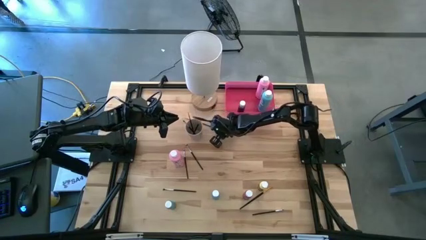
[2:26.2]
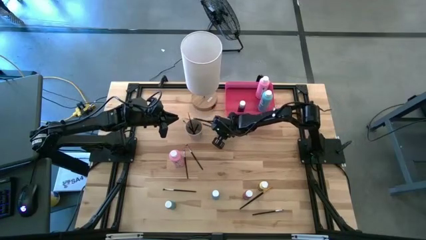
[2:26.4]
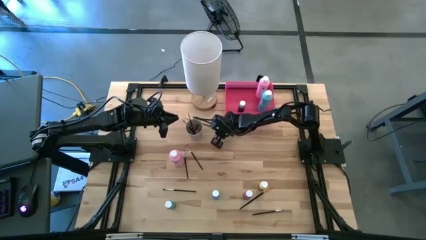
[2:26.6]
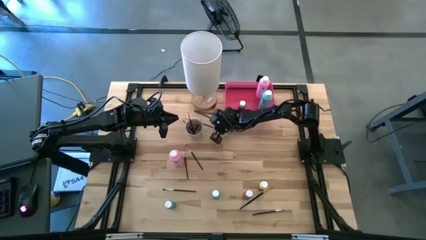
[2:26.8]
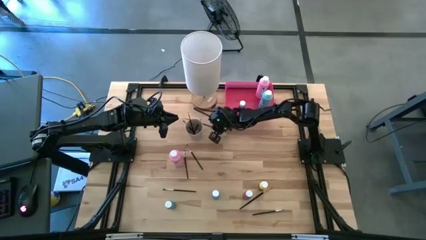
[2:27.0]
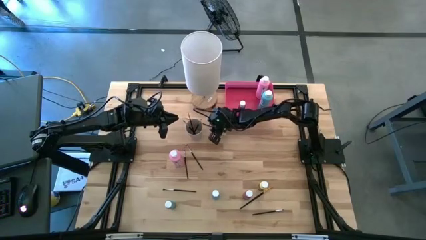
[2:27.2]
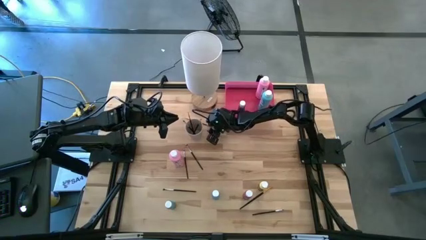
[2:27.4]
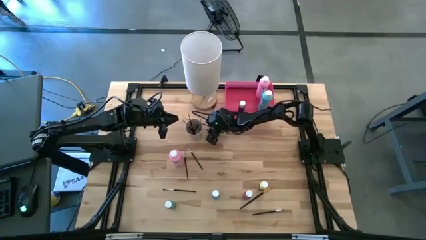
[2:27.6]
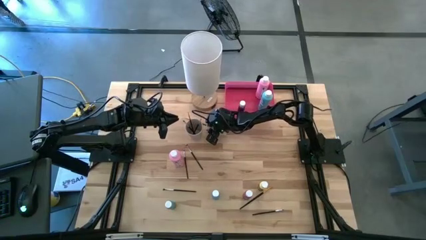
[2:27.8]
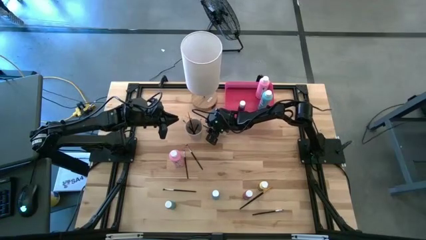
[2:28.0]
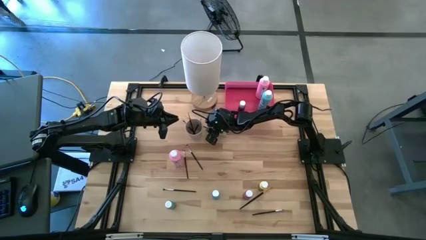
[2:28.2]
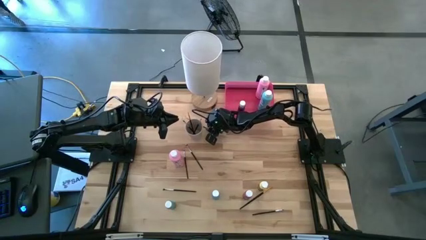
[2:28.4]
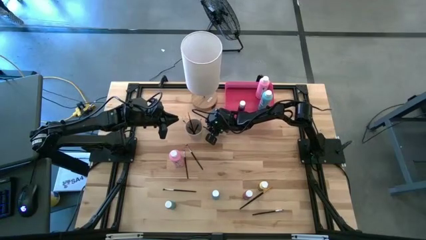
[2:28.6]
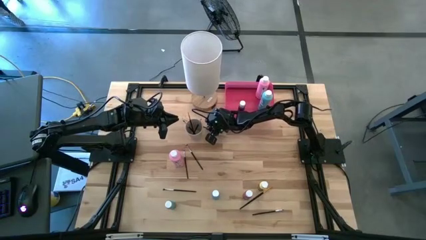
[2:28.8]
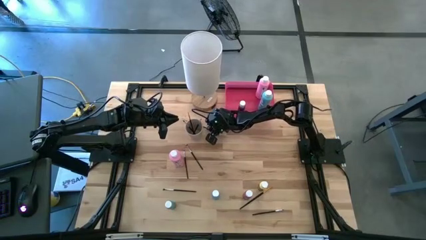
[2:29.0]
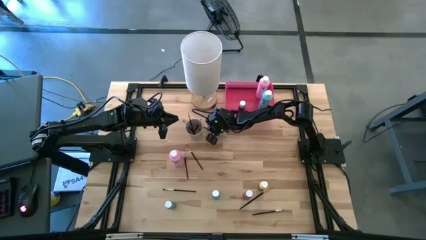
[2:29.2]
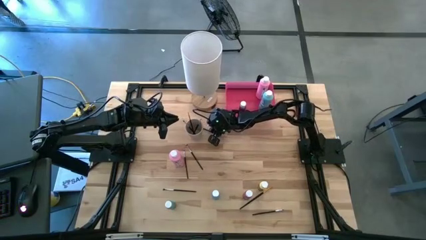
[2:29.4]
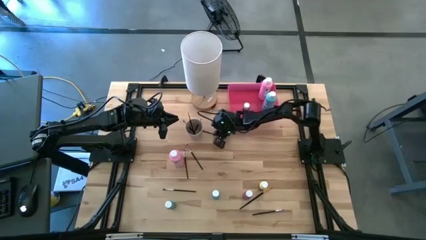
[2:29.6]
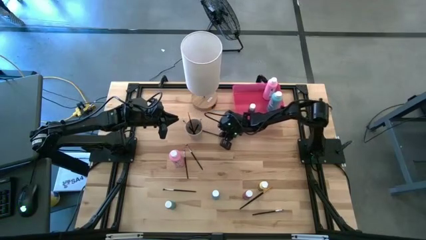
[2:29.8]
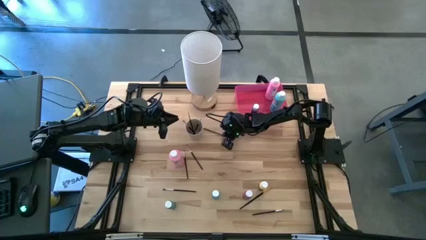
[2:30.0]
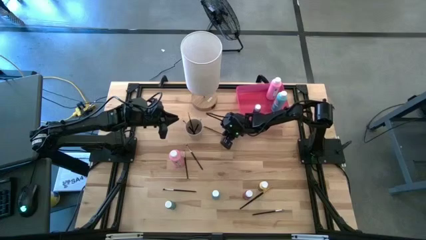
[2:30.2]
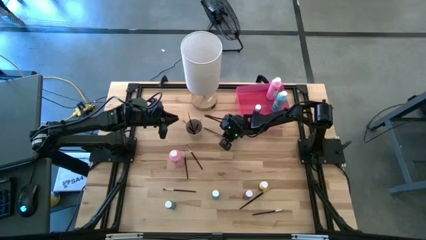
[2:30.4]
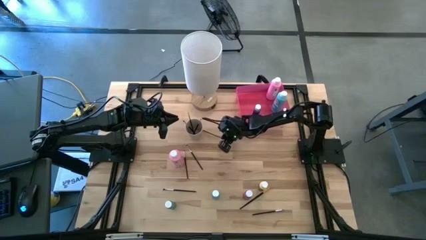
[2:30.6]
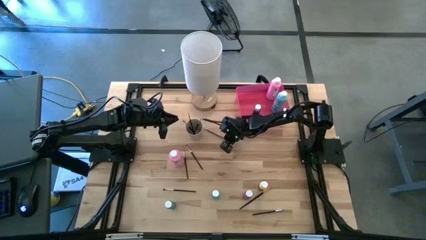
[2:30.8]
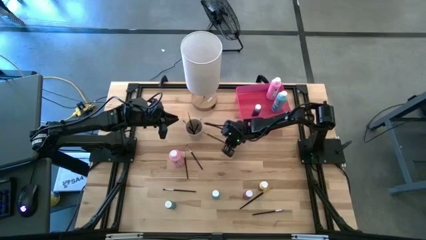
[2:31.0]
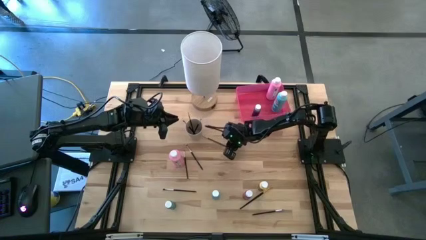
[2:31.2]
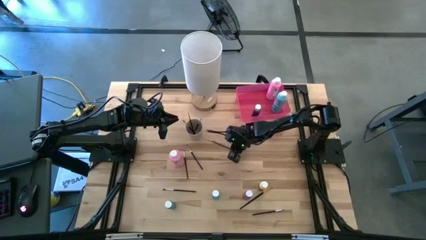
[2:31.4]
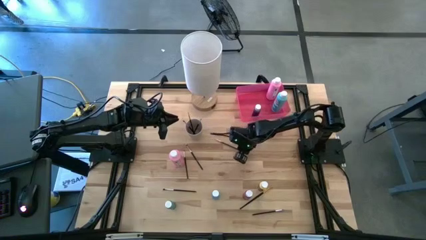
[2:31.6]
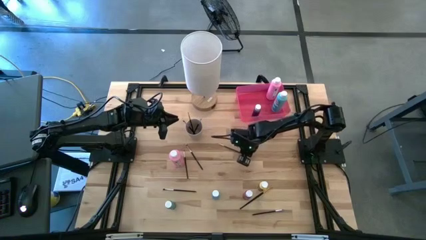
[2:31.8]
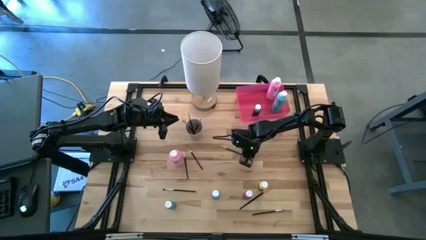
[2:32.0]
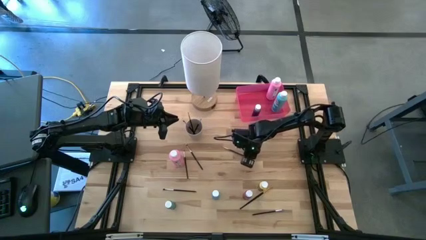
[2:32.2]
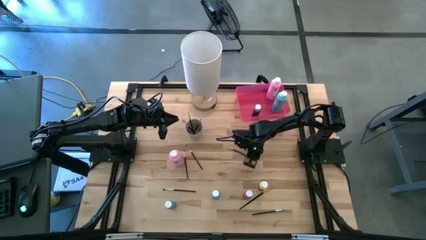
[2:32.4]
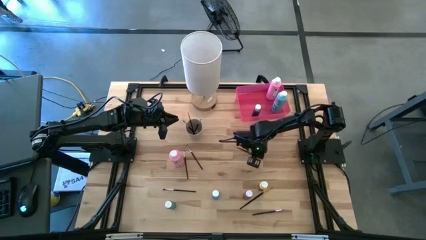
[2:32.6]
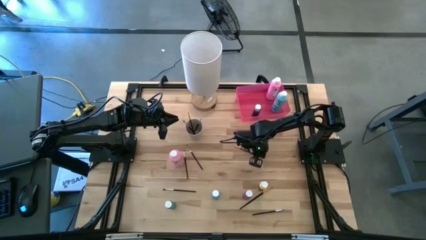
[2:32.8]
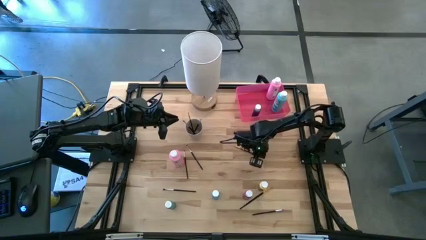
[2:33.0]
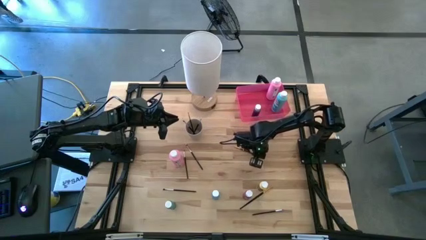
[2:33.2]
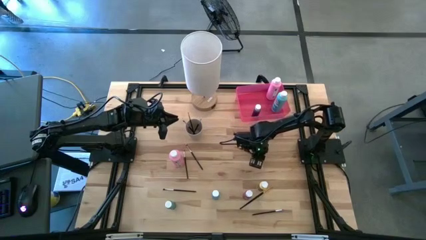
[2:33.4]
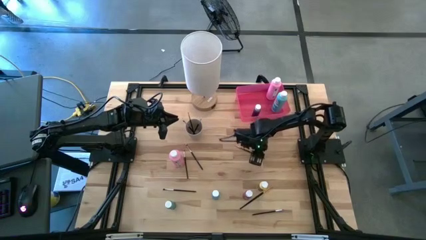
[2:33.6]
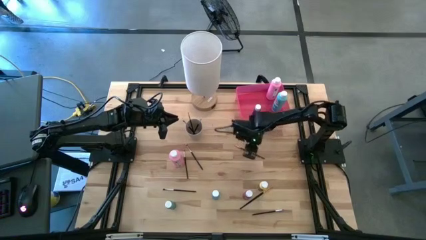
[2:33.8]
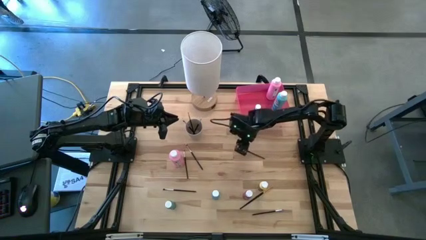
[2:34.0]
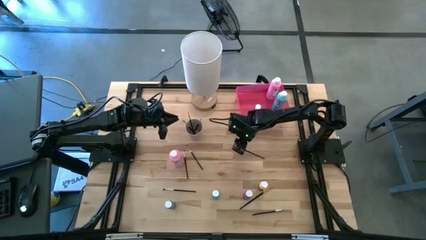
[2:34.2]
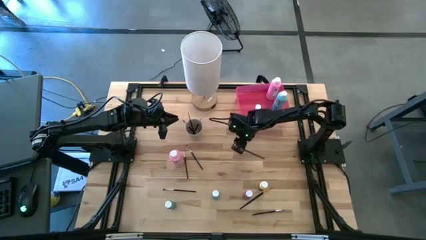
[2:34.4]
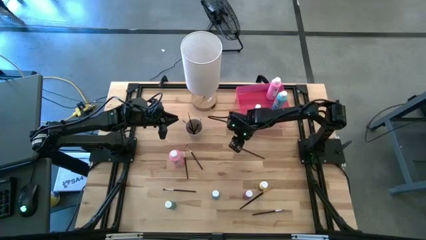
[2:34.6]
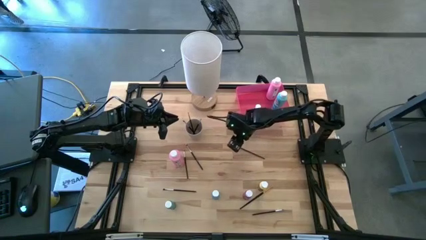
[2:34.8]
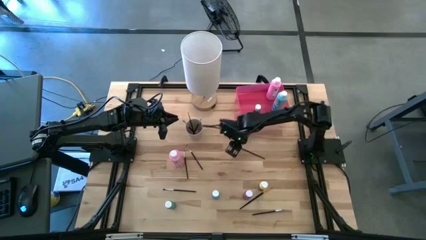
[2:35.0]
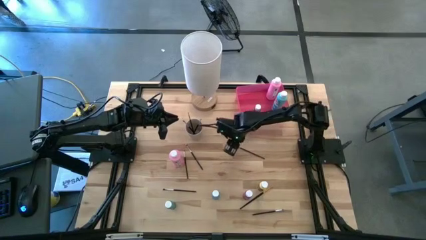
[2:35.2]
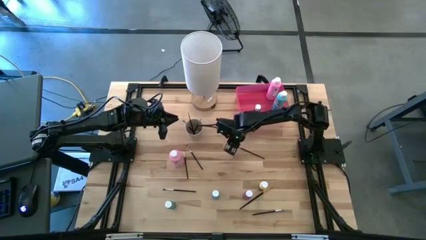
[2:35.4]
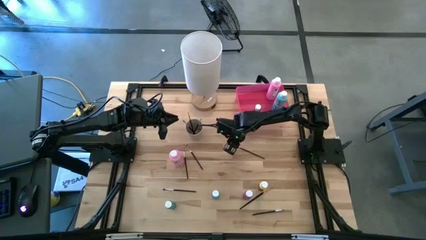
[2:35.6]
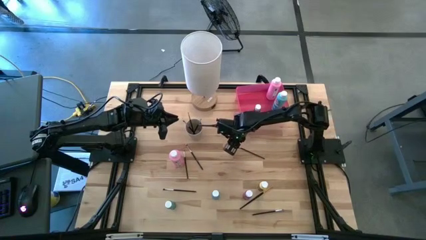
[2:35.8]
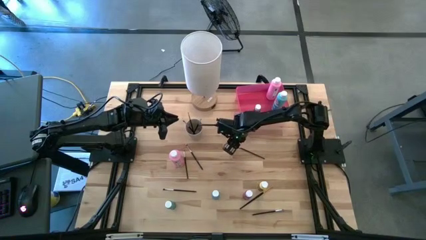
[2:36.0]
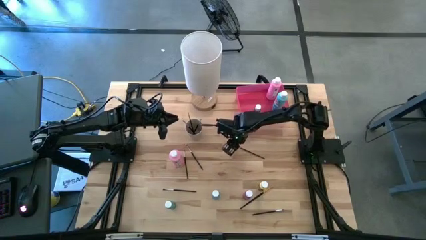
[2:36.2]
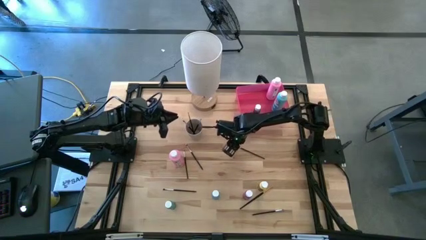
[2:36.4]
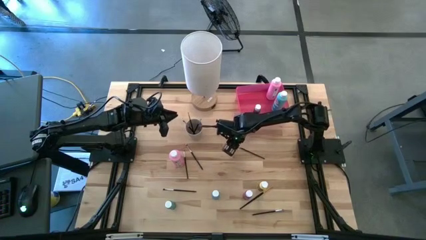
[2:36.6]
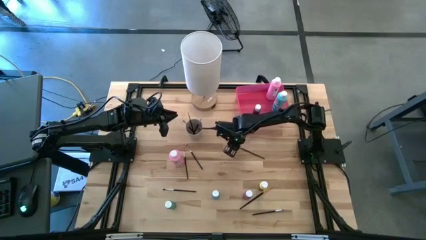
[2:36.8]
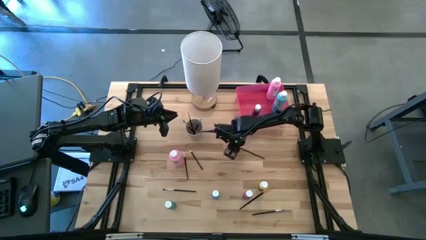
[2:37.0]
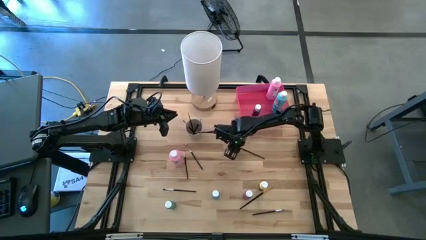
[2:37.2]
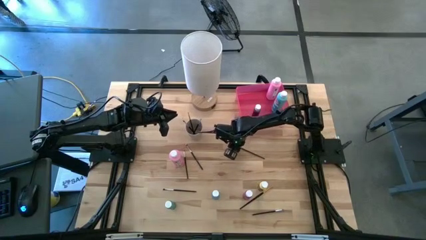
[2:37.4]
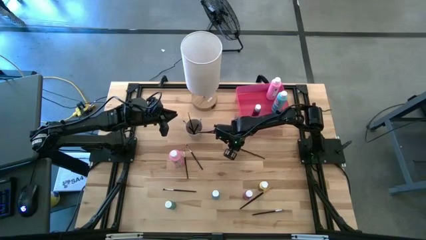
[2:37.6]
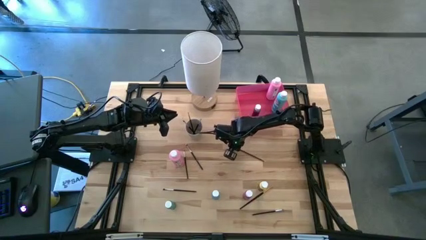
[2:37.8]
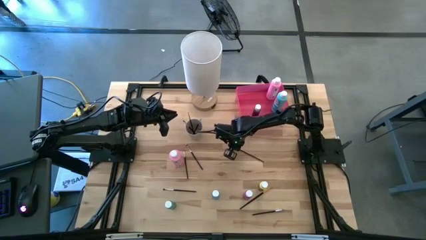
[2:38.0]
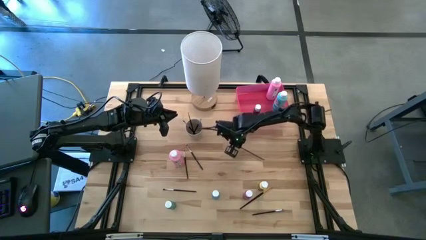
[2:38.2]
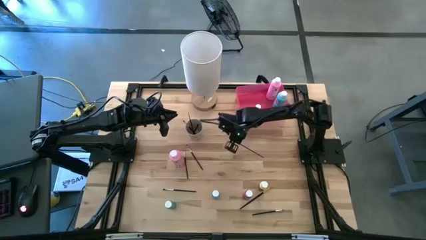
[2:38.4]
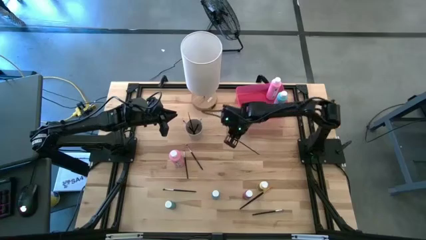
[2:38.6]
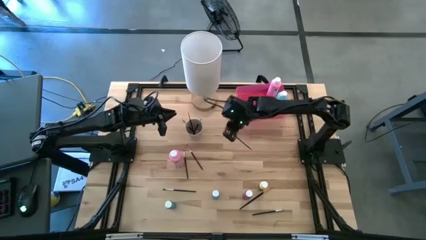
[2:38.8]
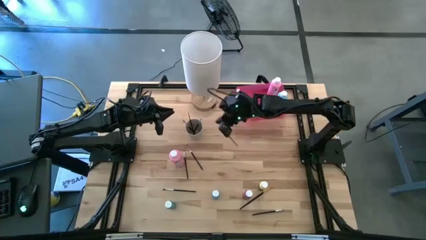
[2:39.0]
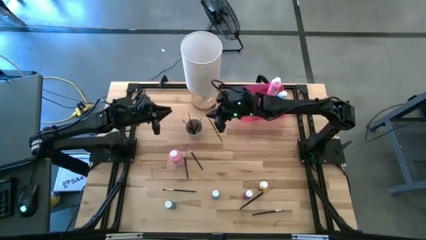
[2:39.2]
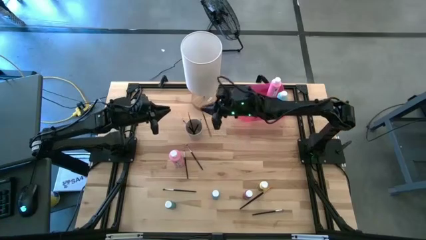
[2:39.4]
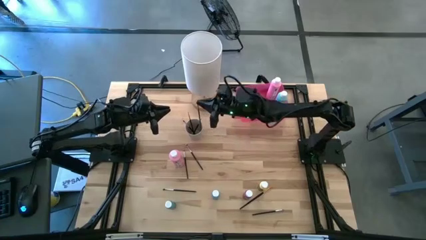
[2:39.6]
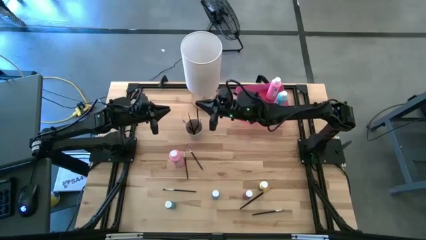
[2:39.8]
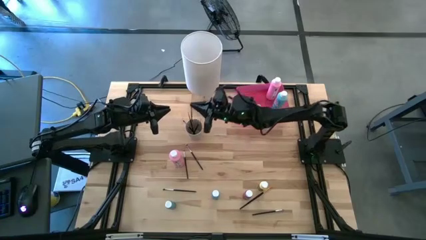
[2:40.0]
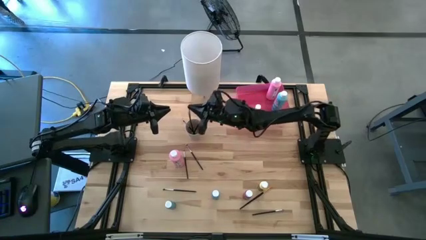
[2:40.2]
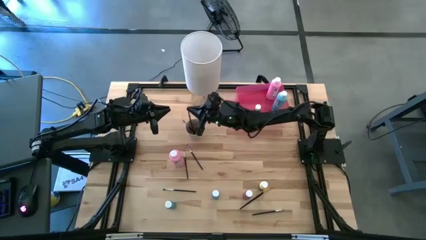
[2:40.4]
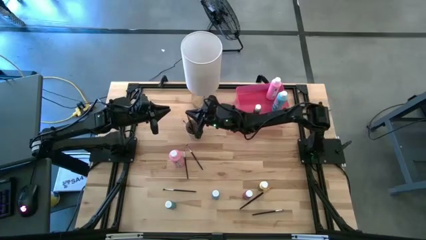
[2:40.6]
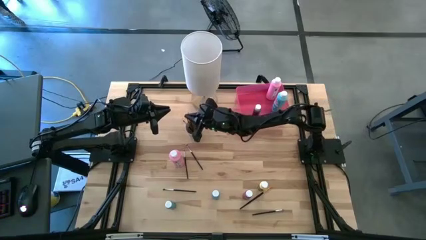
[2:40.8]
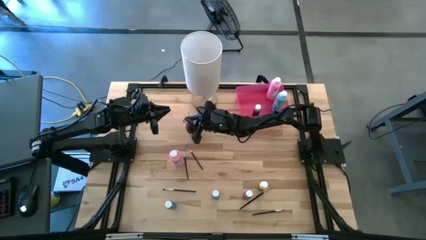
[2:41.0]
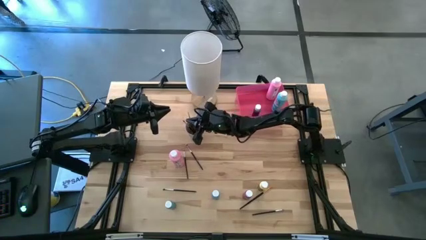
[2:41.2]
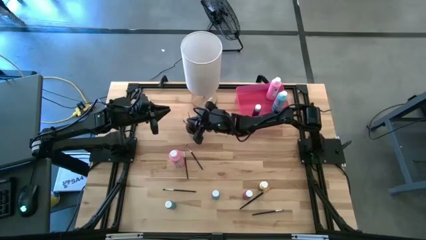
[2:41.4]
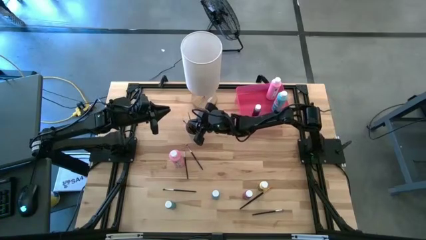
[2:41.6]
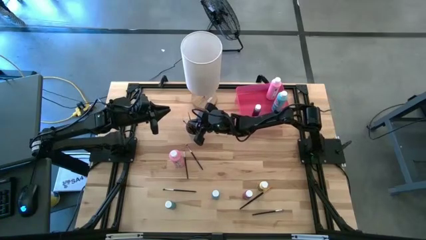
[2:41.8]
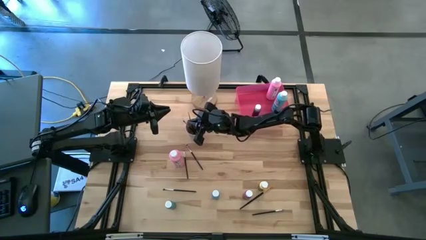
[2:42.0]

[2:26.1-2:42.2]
Task: Pick & Place Paint Supplies
Put the golden paint brush into the white cup
